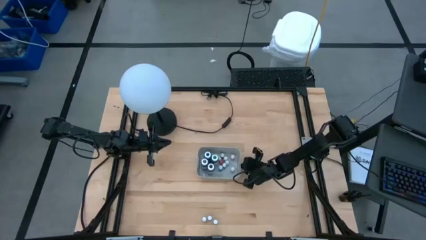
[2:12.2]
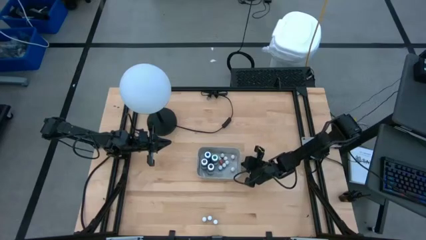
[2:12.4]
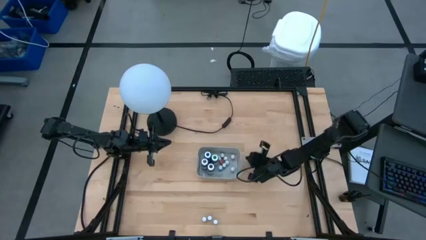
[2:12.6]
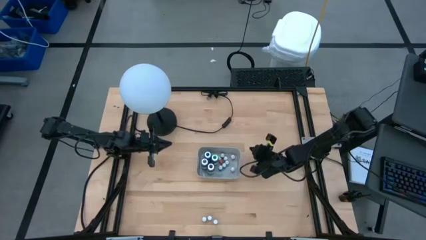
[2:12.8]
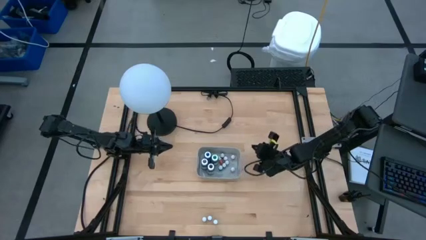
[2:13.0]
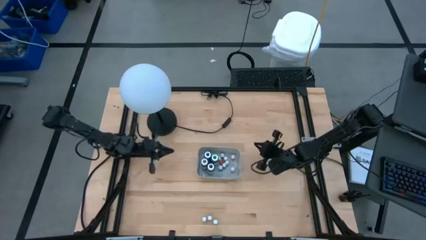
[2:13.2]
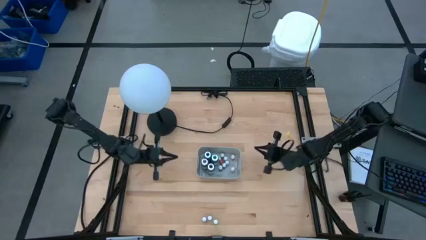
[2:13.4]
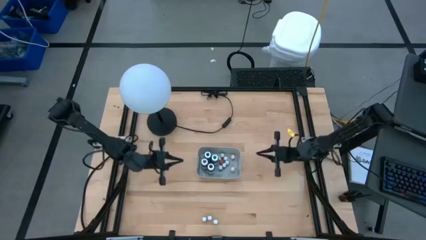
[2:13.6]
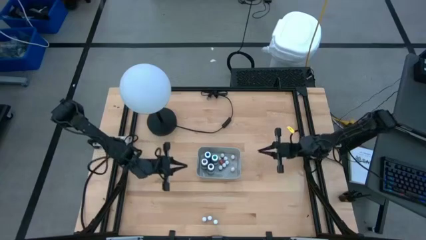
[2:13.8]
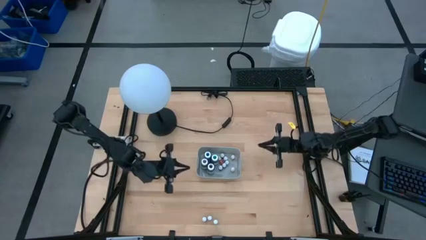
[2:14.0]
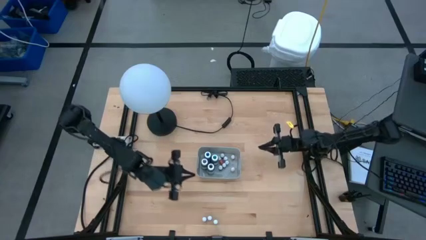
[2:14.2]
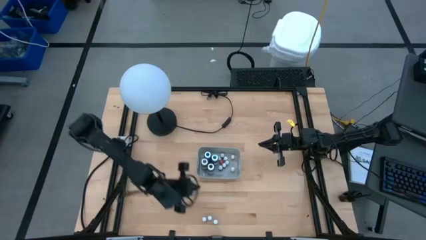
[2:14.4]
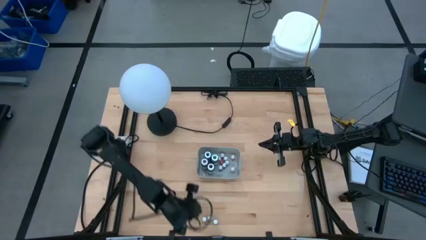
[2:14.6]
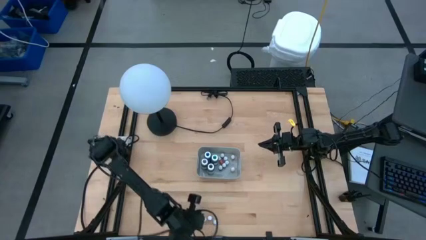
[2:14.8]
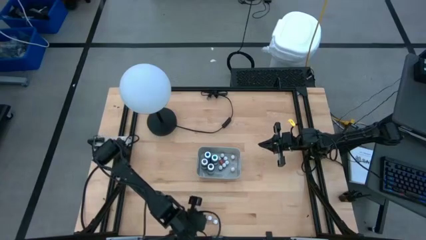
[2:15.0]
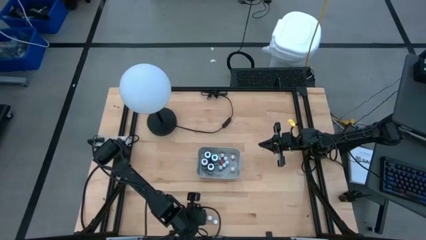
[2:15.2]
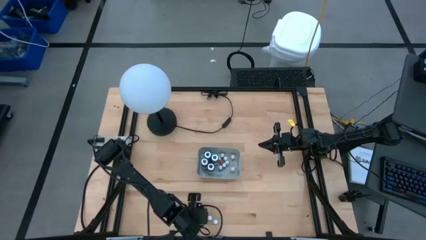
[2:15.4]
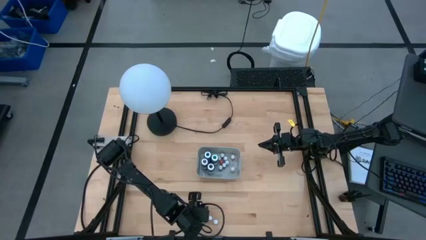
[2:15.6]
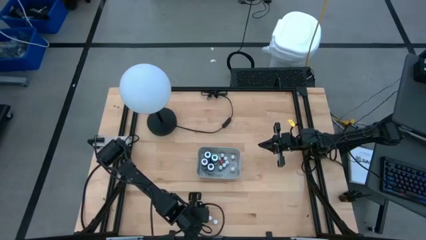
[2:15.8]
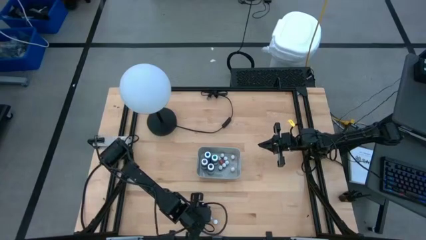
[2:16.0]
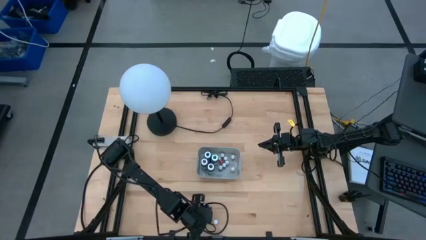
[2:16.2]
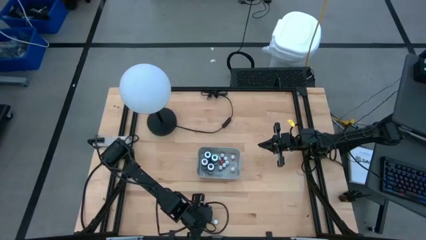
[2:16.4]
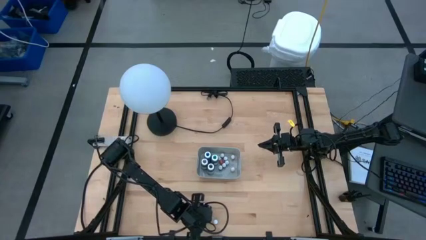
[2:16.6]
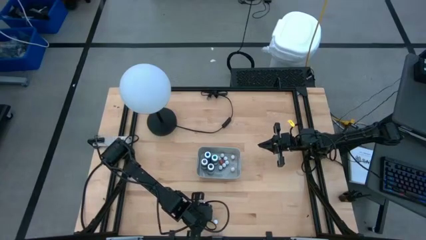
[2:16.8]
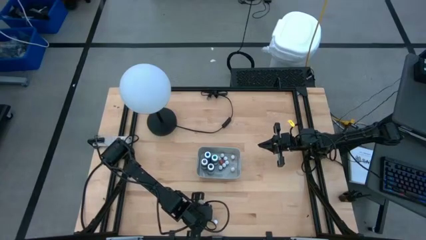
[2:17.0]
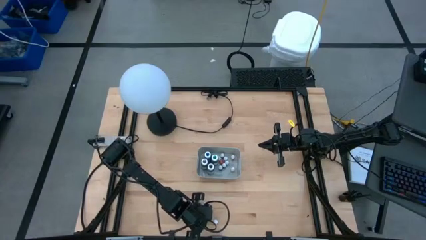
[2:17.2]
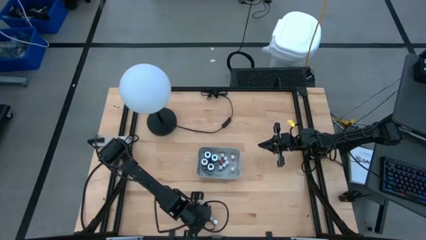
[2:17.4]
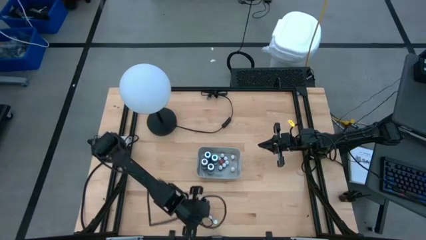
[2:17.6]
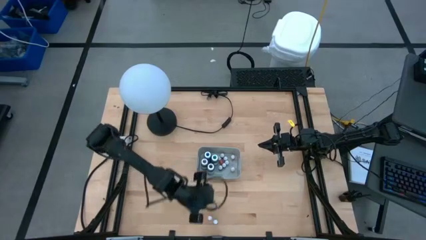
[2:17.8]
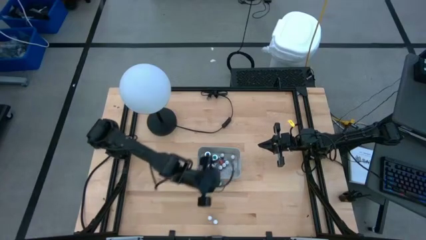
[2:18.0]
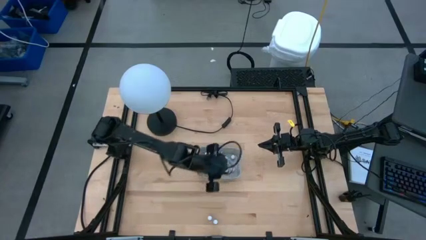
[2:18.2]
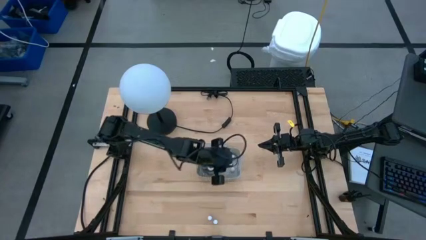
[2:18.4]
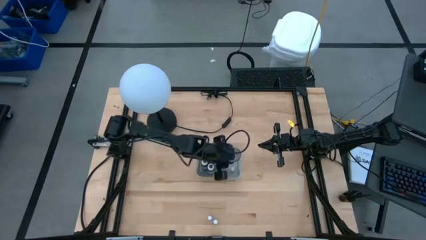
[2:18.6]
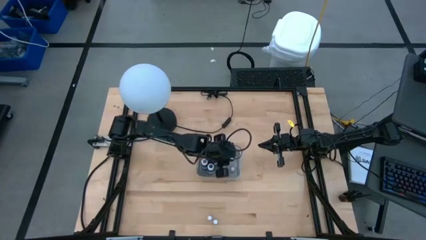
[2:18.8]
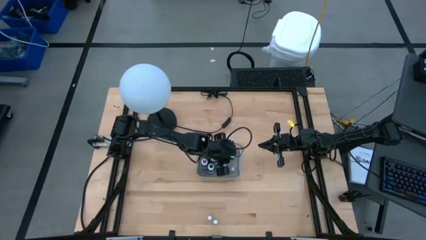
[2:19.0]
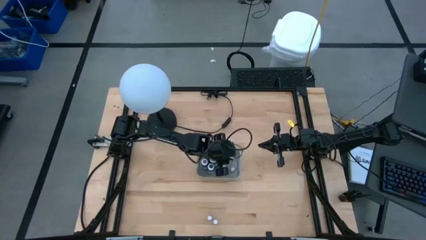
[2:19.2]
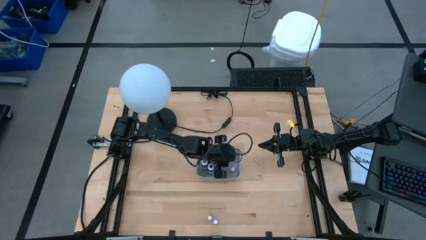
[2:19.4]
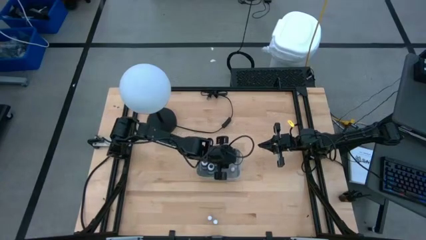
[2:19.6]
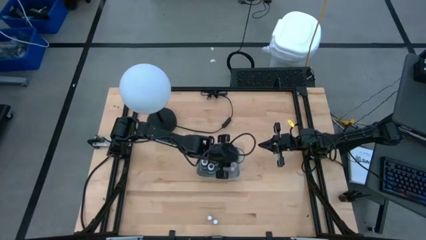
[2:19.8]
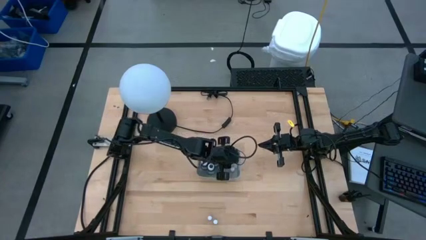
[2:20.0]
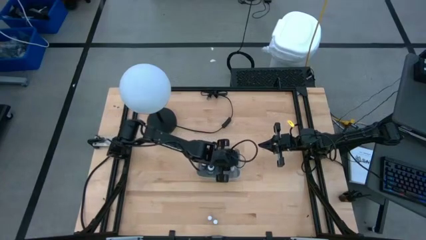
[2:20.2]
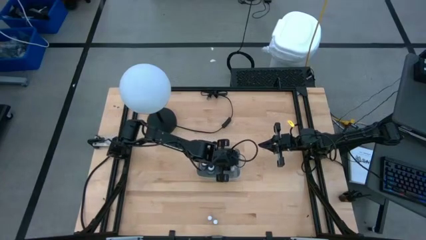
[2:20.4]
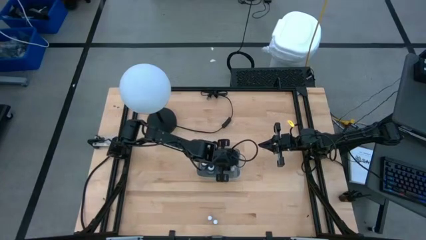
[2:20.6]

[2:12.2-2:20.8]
Task: Pick & Place food coloring
Put the small black food coloring bottle into the gray bin

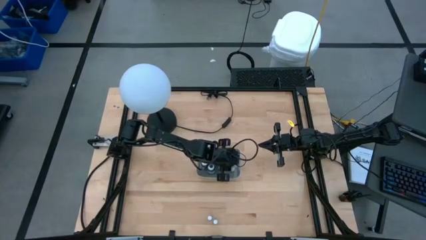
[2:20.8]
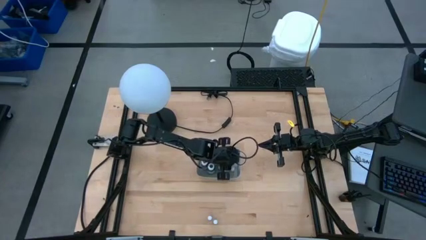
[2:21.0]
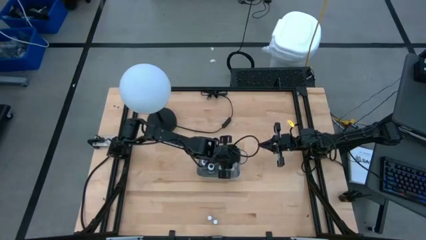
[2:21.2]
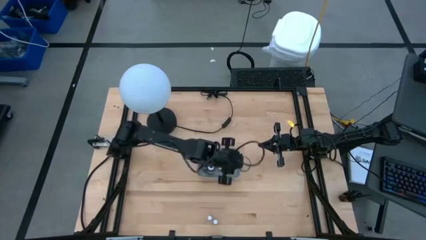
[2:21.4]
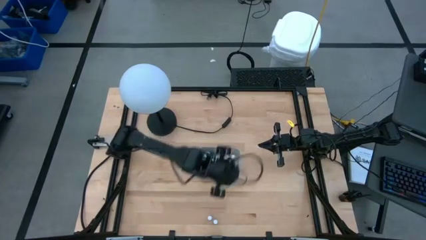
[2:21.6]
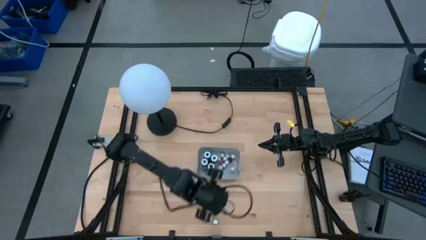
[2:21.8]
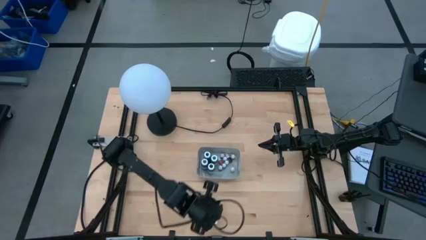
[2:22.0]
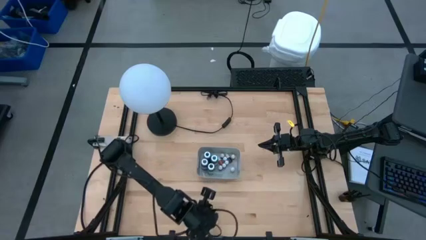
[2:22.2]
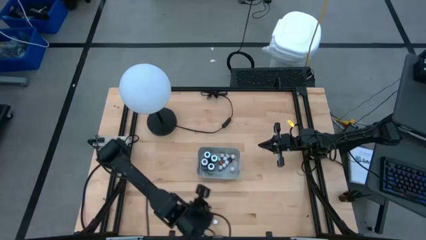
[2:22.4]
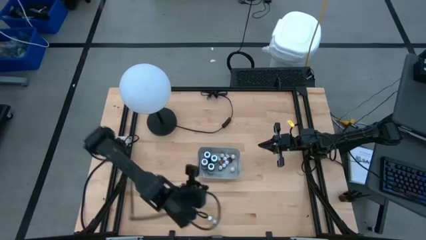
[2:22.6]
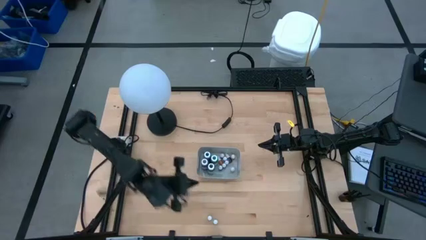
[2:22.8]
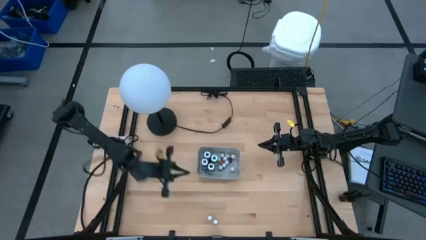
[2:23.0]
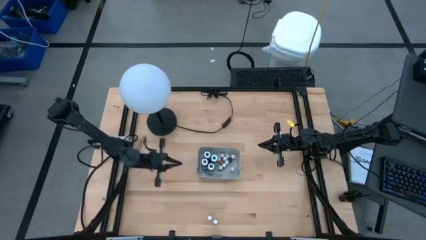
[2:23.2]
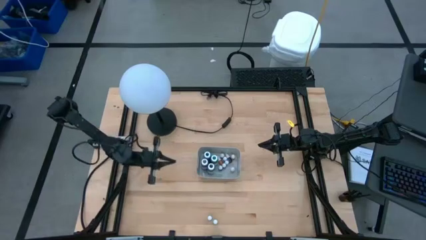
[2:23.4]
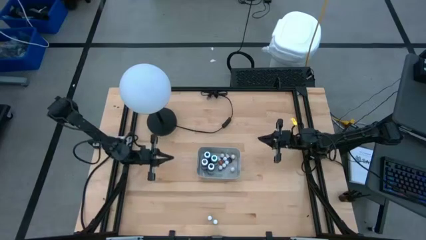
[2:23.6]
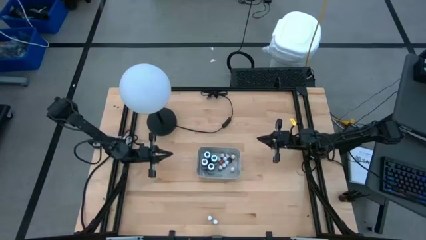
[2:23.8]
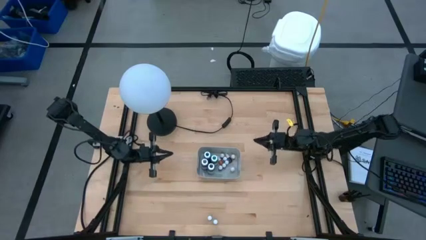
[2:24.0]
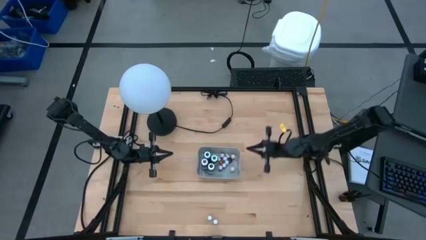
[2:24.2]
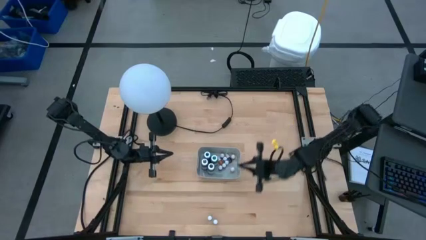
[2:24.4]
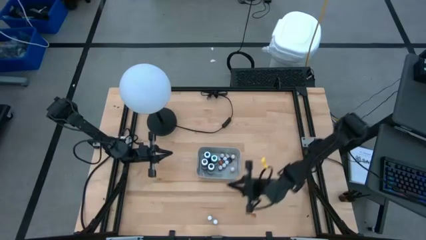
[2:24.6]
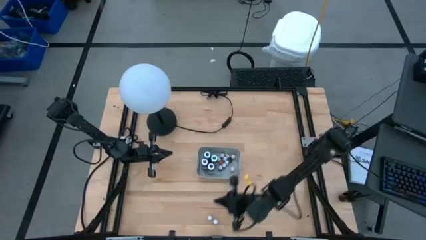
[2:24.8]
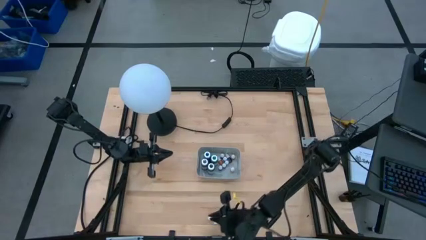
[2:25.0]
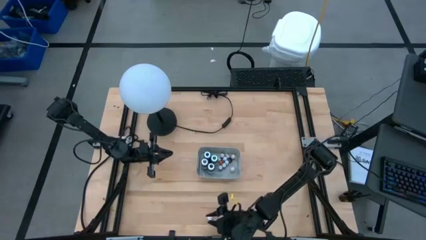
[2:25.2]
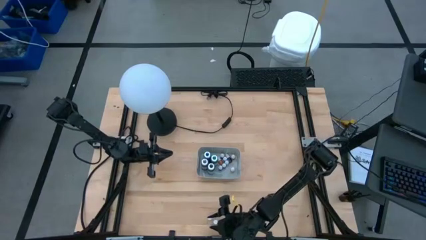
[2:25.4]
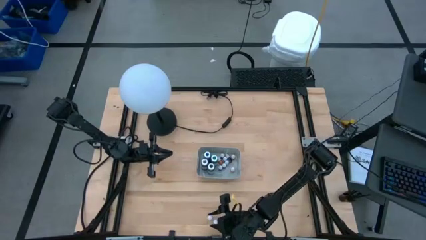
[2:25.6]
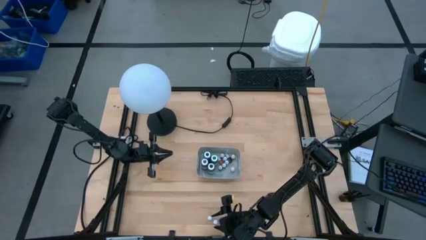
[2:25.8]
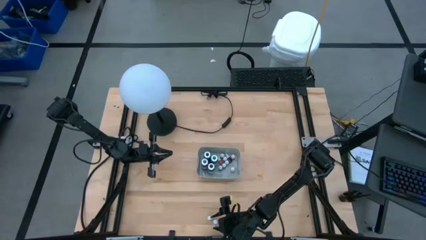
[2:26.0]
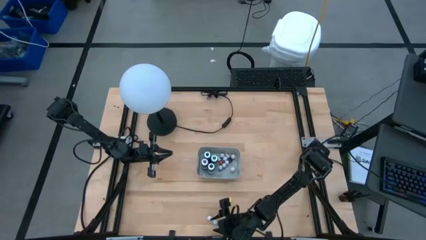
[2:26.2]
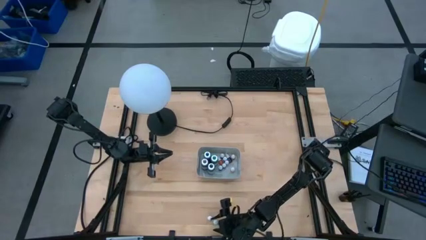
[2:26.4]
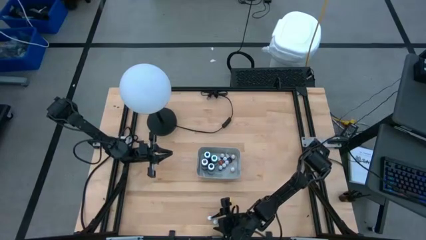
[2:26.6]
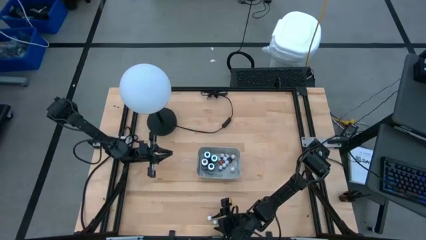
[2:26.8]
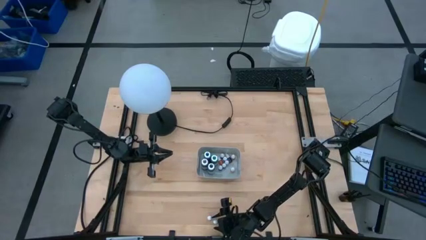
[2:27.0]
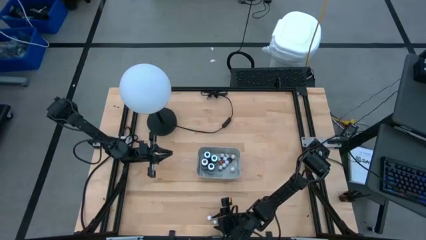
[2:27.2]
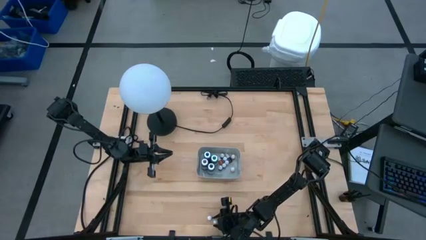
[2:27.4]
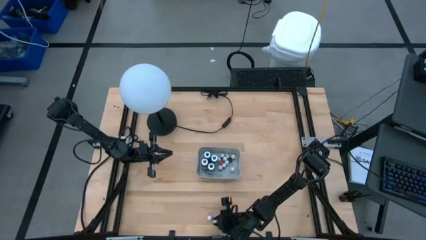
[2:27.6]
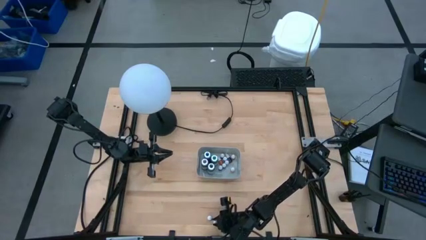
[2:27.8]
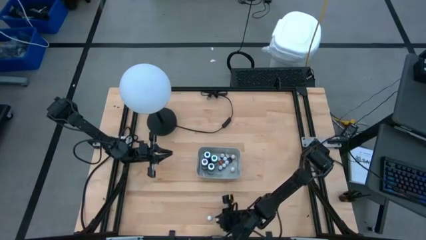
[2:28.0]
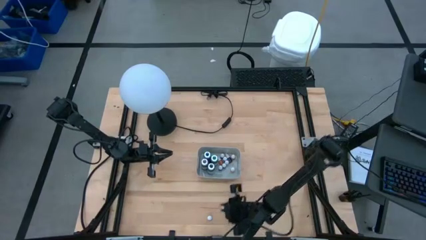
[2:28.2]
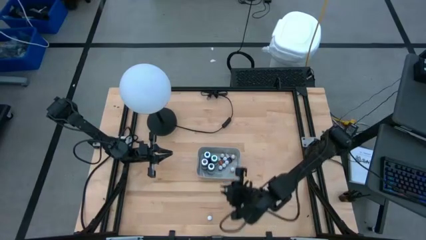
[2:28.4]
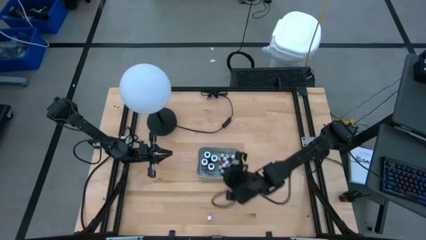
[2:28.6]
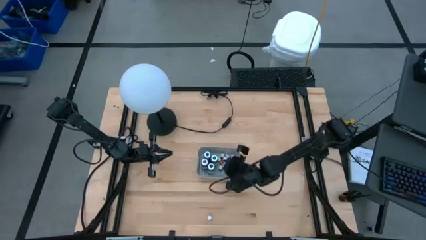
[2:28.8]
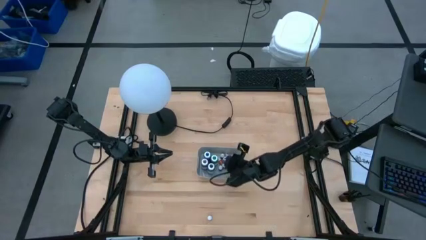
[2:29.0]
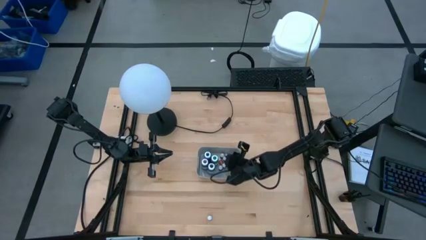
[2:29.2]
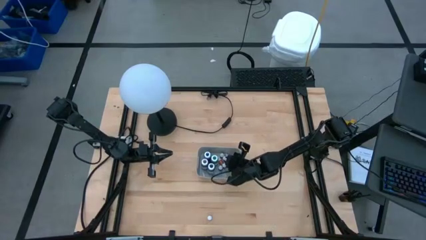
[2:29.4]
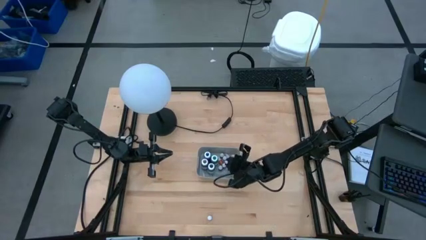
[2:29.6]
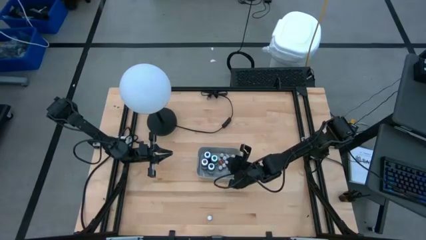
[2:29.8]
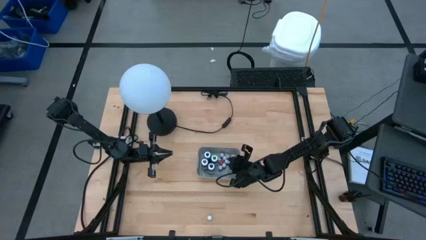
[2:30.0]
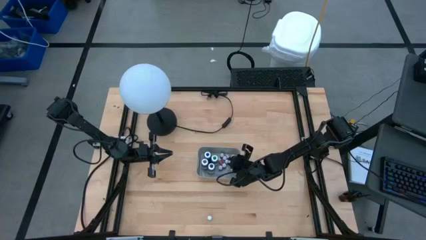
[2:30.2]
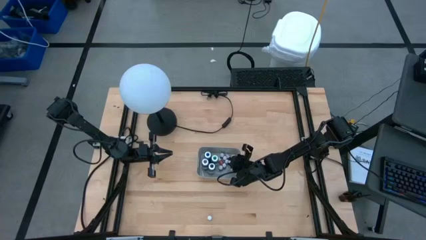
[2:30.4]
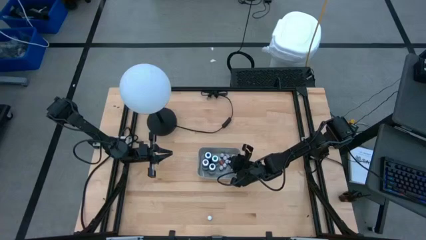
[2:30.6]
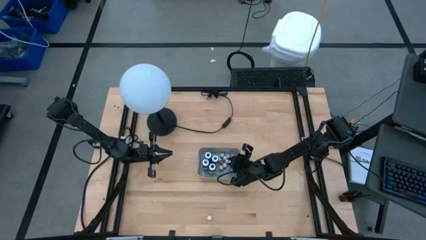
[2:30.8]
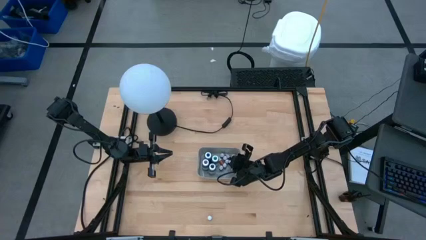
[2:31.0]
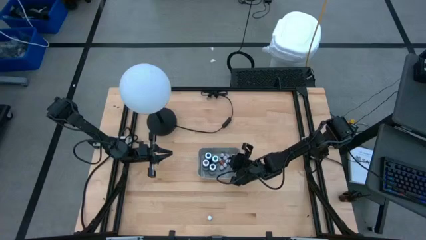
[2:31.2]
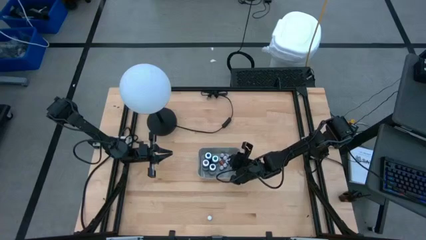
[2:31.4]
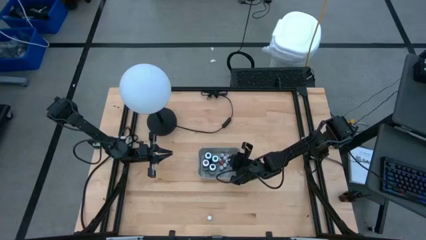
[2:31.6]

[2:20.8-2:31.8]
Put the small red food coloring bottle into the gray bin
